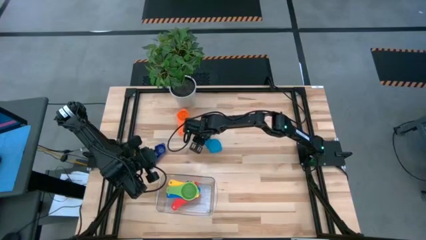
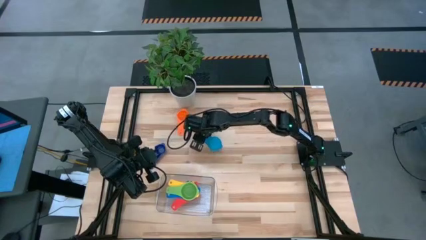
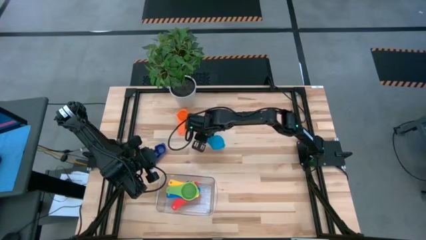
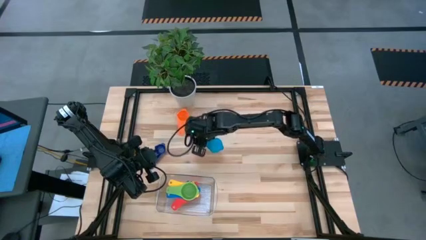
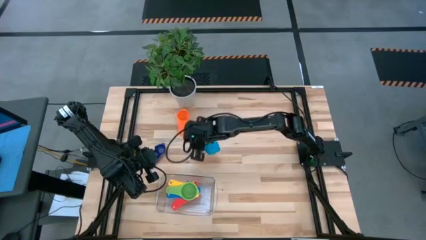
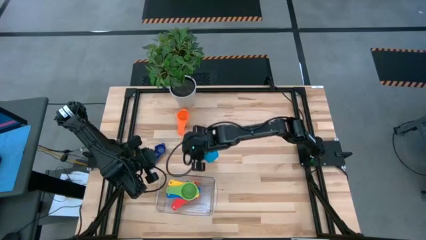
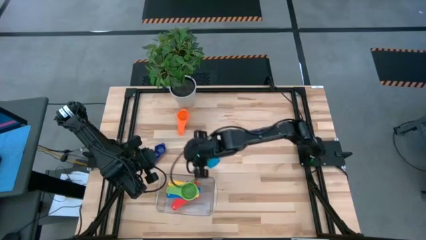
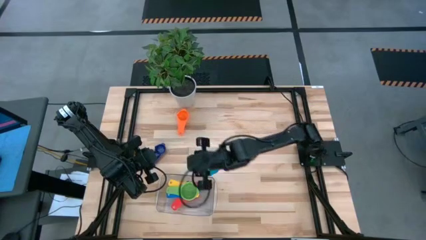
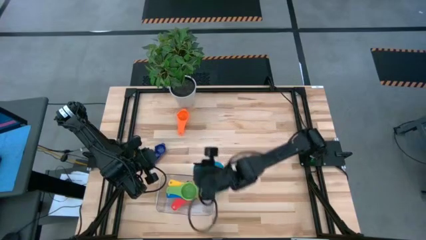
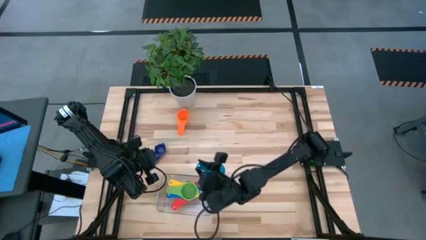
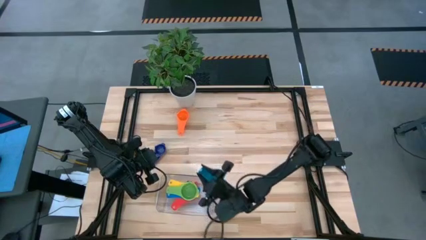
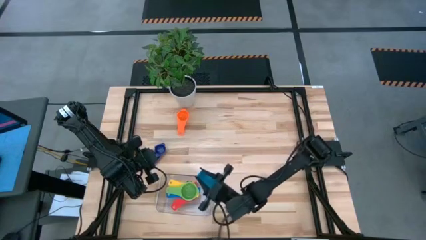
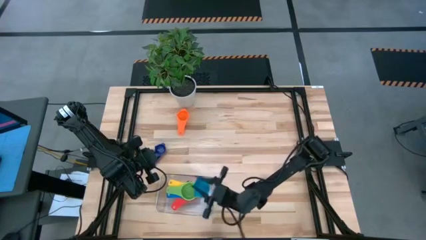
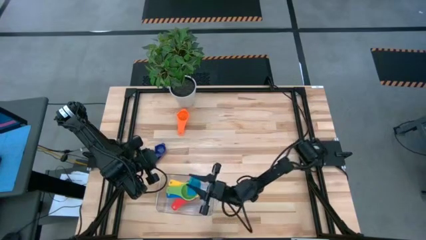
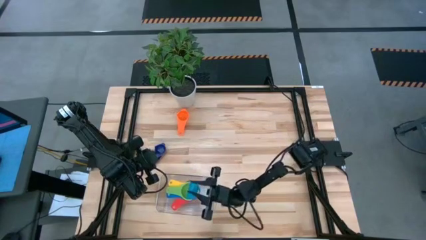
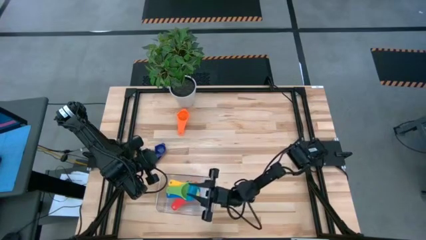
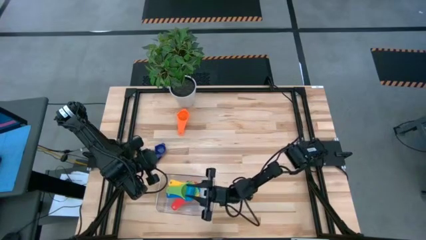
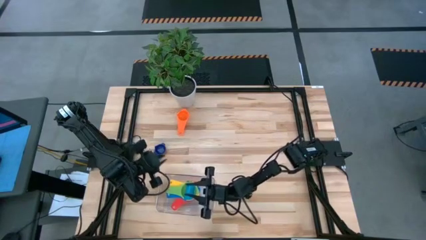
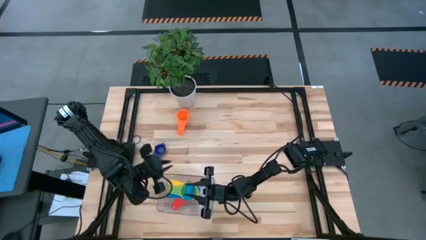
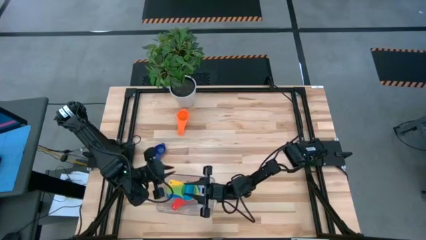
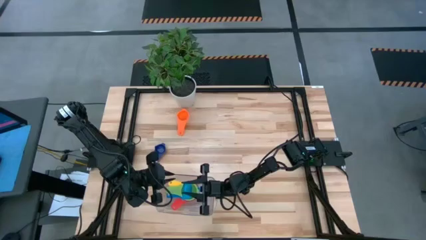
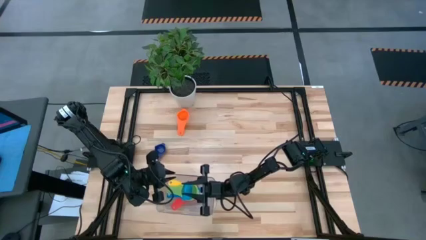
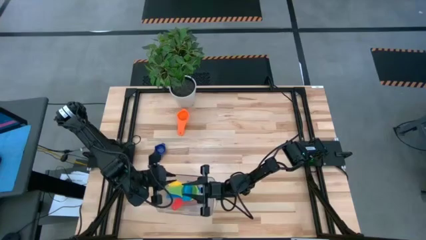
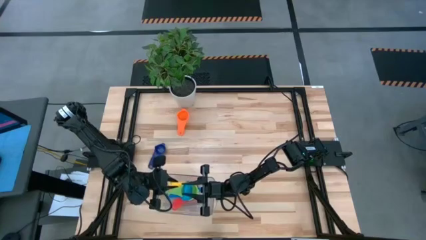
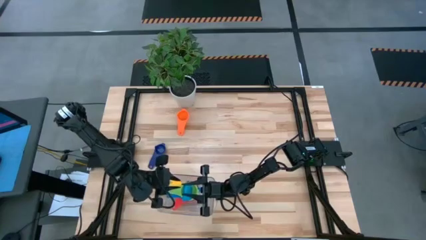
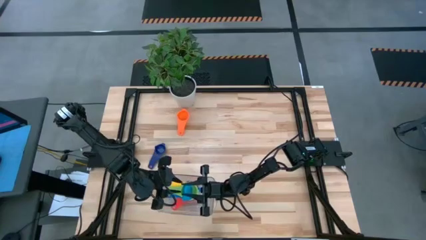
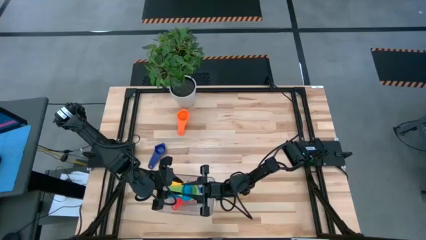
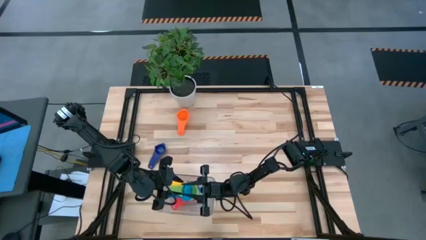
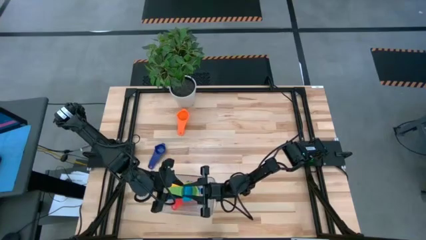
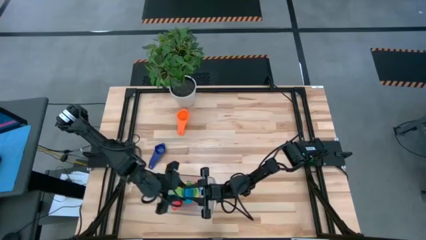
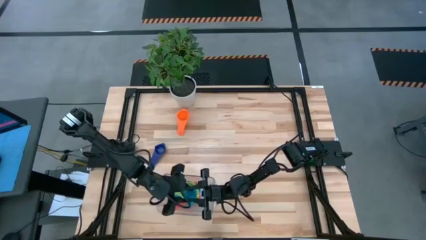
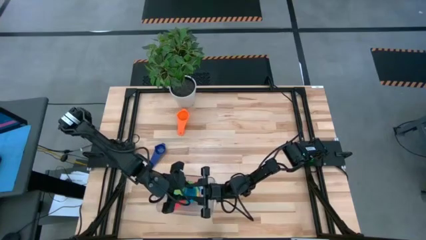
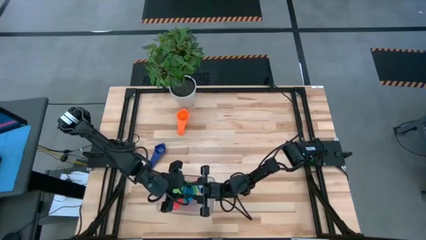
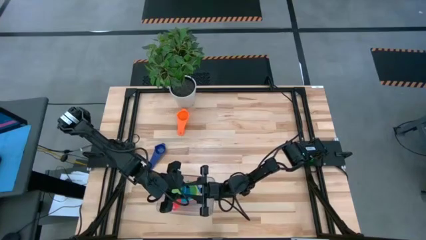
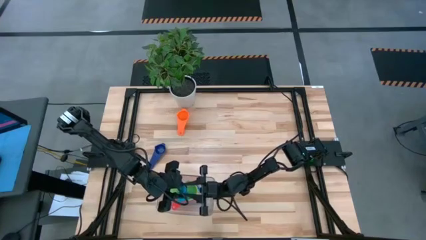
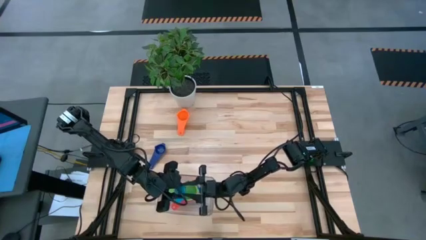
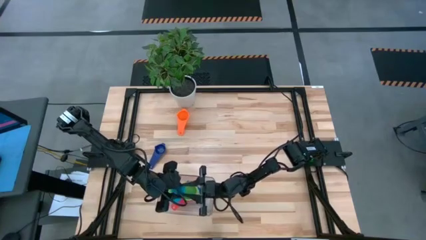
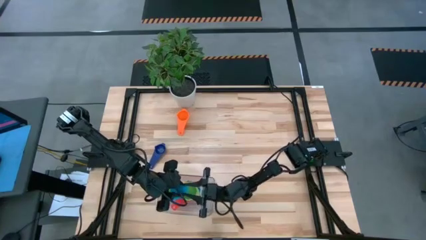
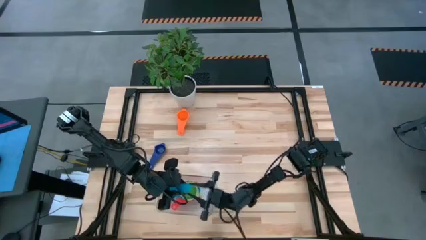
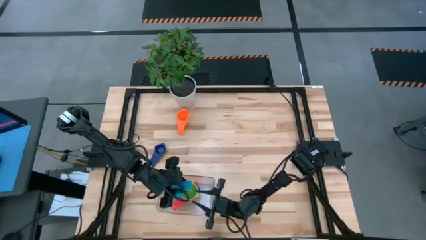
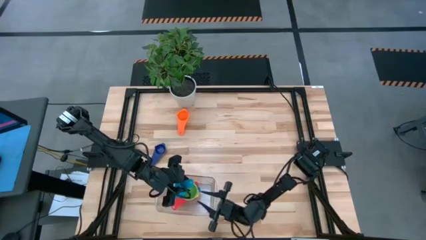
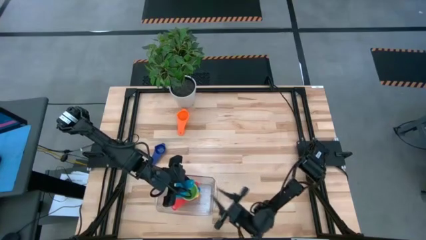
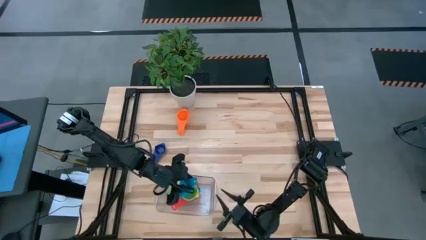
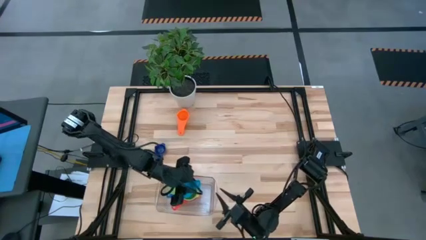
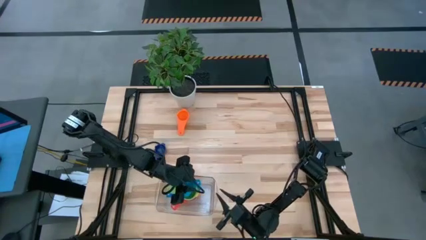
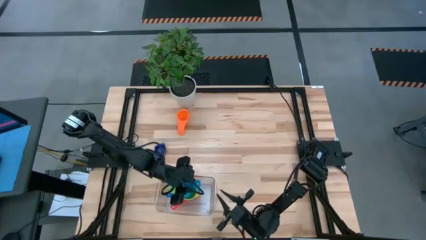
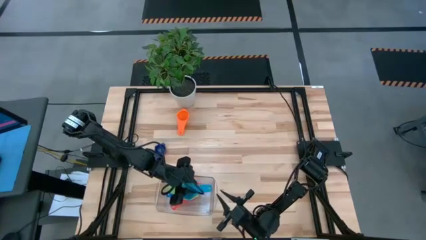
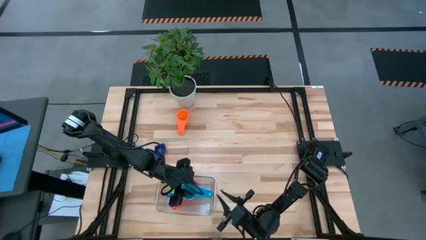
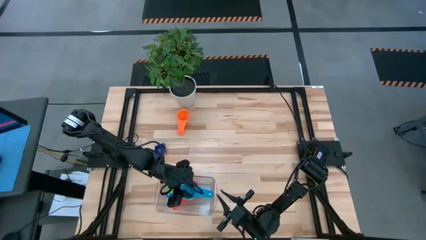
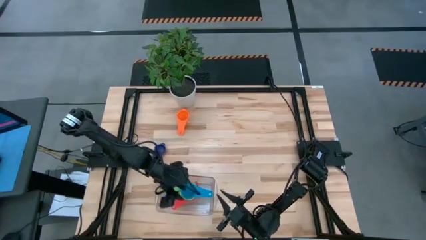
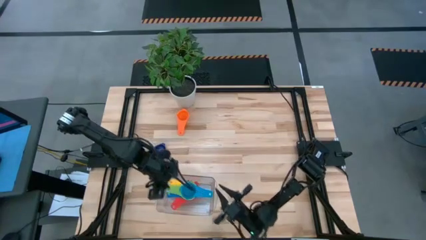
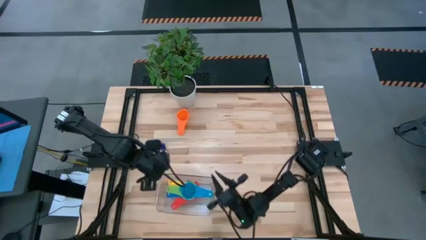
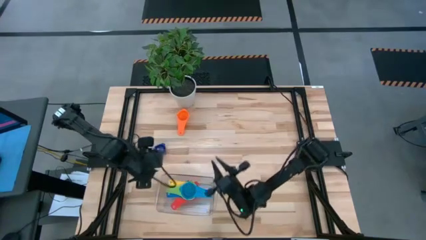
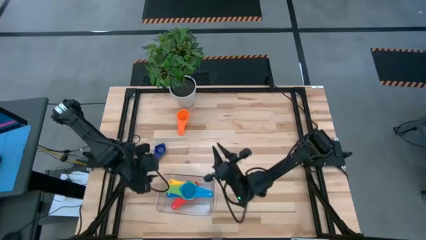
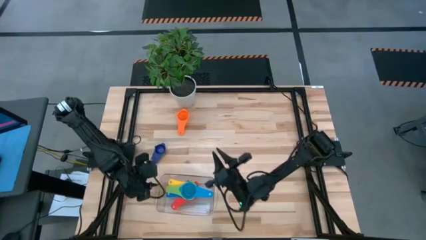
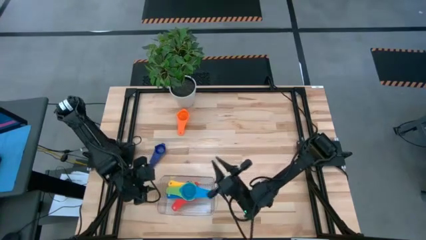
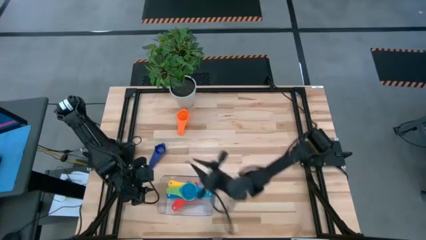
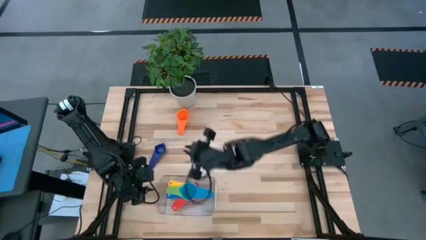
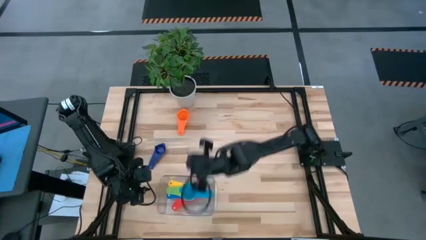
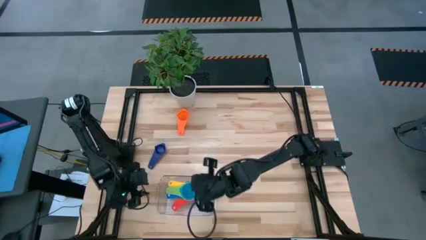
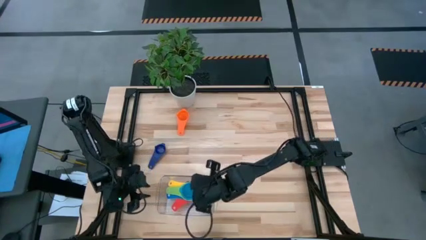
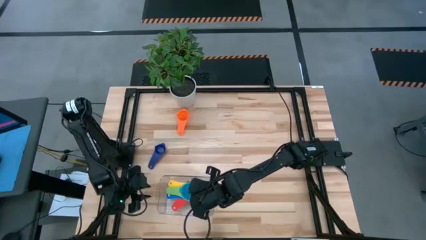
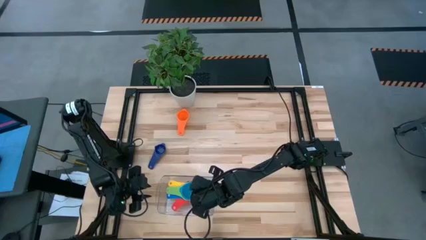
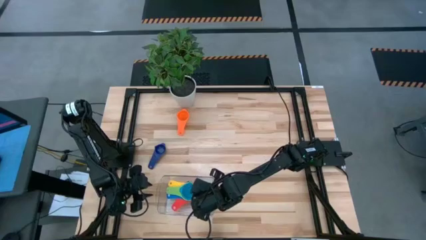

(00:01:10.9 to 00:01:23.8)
Task: Nest measuring cups in basket
Stack the light blue measuring cup on top of the green measuring cup
